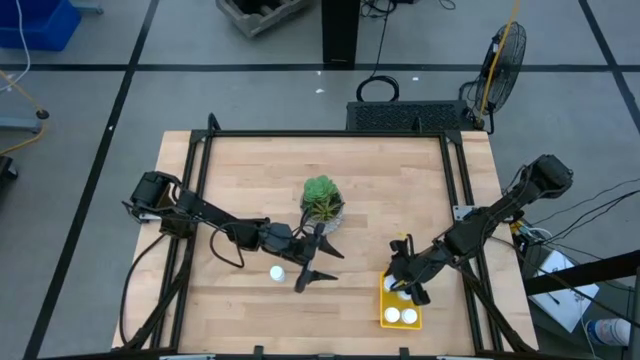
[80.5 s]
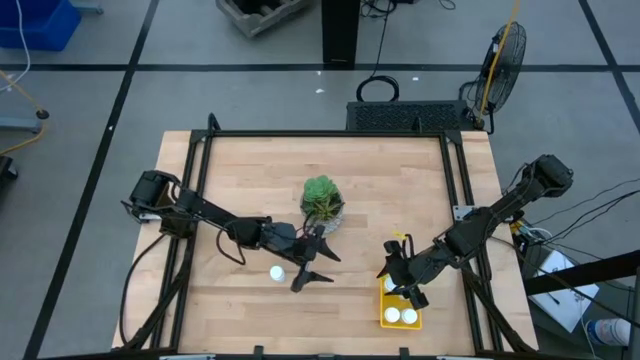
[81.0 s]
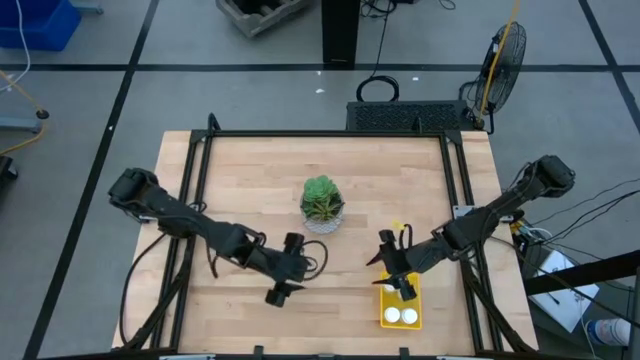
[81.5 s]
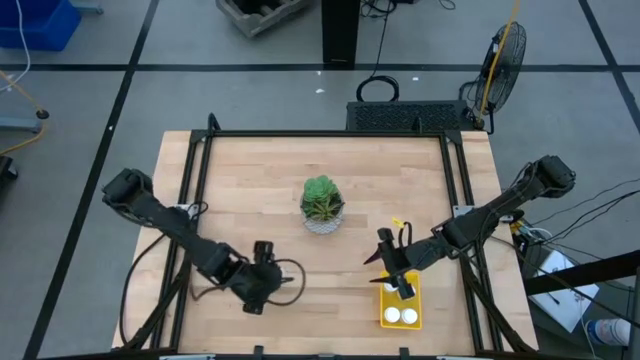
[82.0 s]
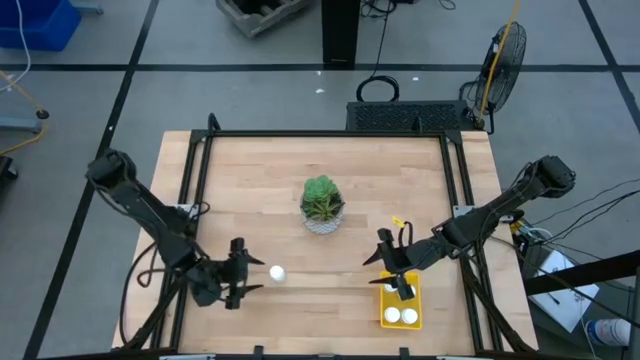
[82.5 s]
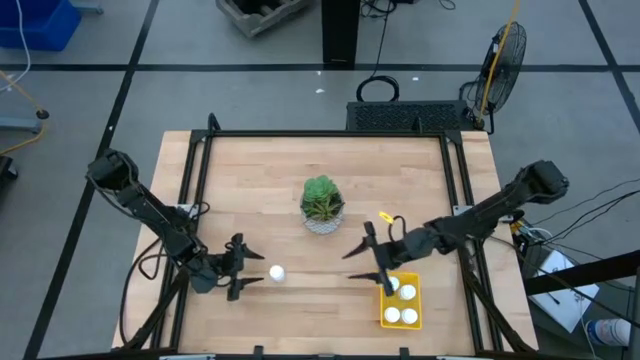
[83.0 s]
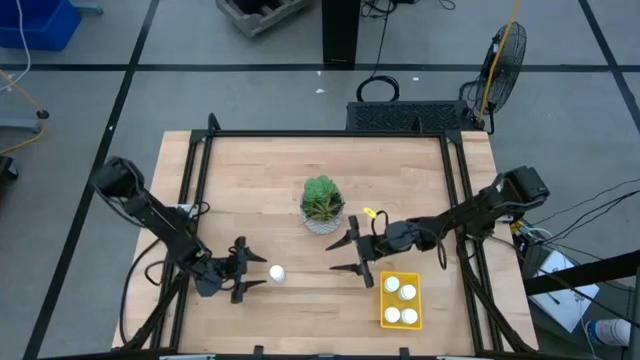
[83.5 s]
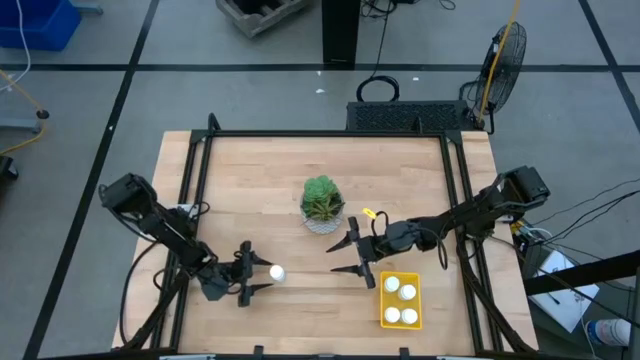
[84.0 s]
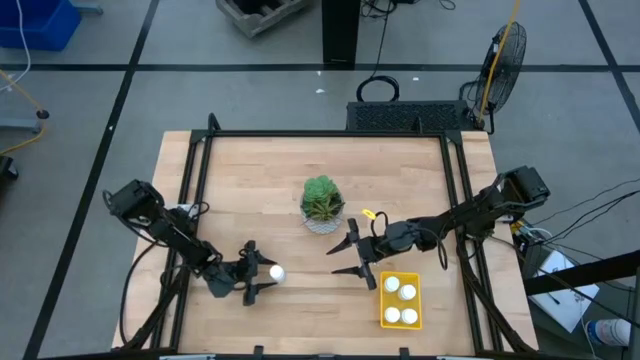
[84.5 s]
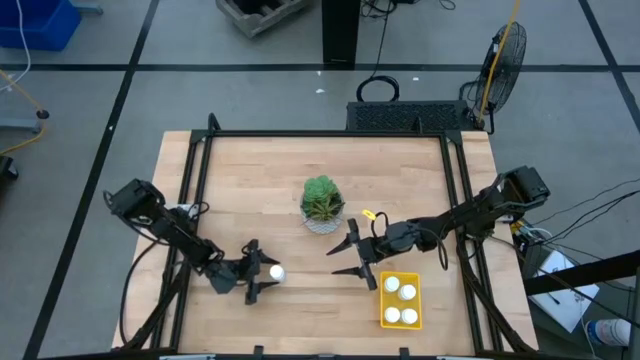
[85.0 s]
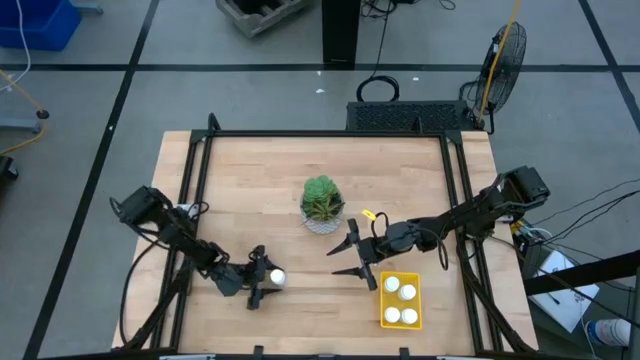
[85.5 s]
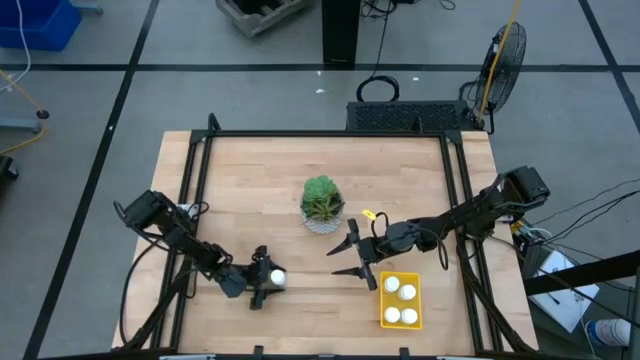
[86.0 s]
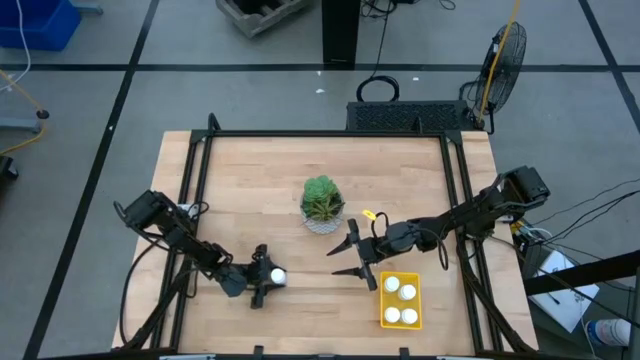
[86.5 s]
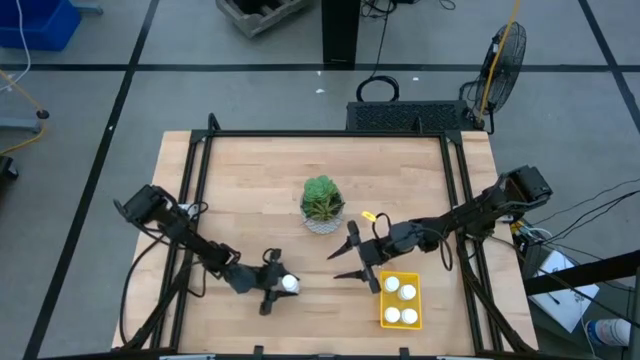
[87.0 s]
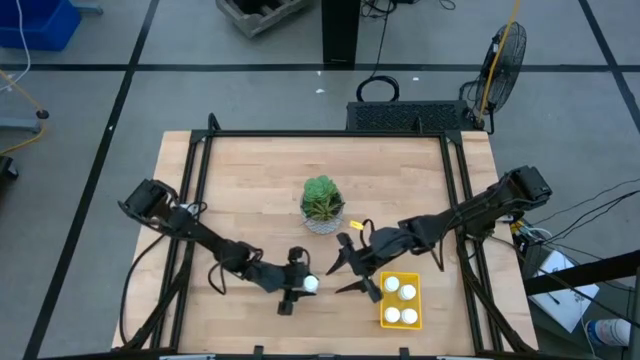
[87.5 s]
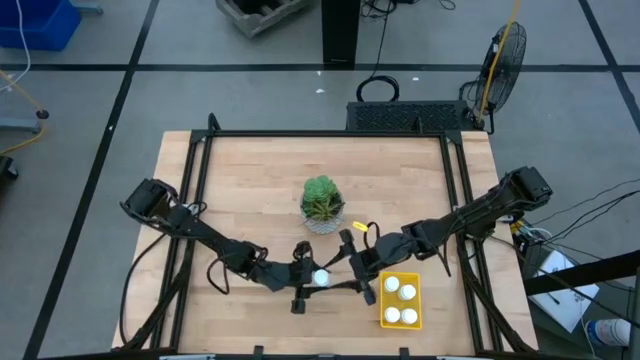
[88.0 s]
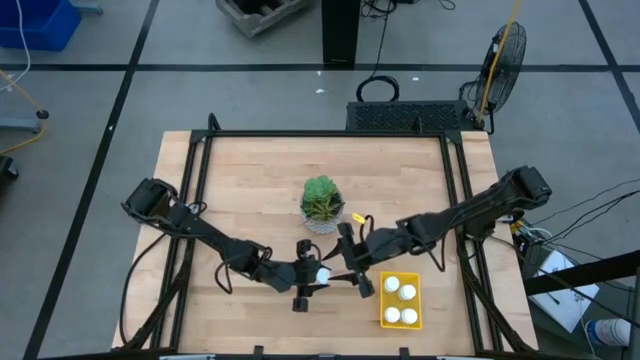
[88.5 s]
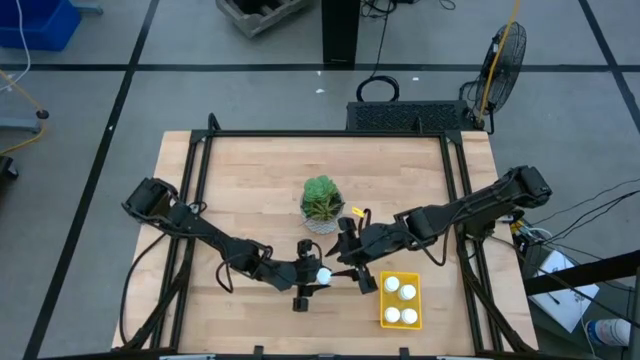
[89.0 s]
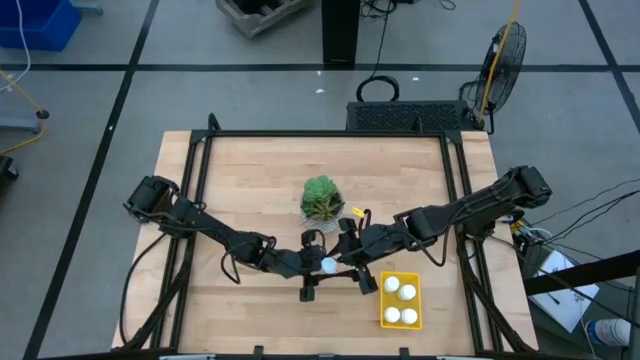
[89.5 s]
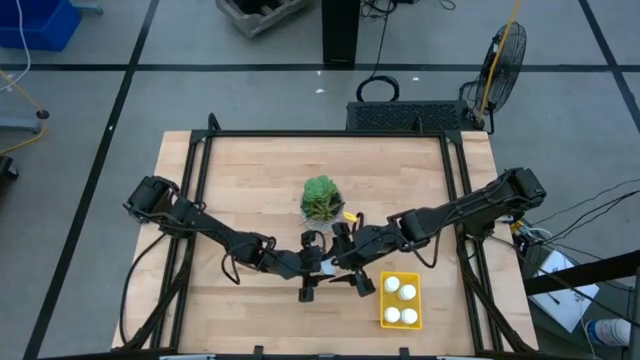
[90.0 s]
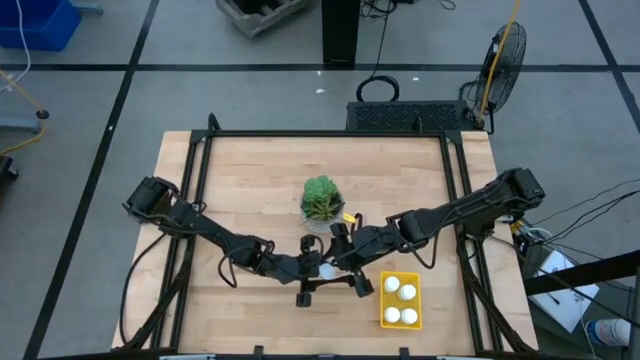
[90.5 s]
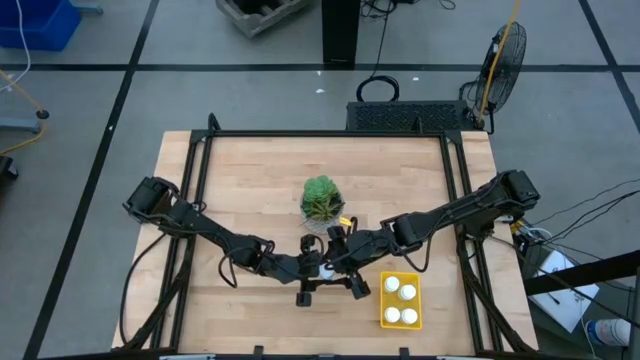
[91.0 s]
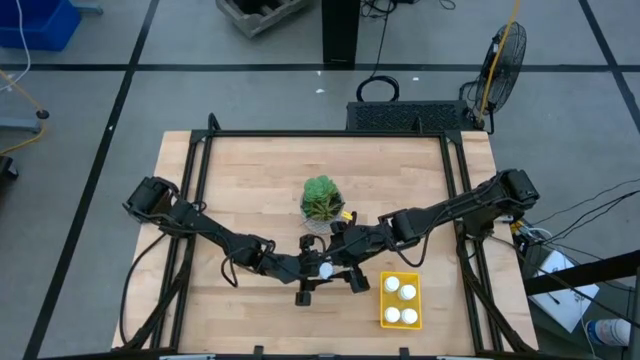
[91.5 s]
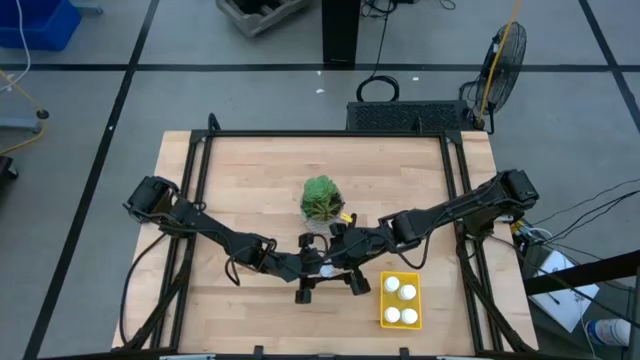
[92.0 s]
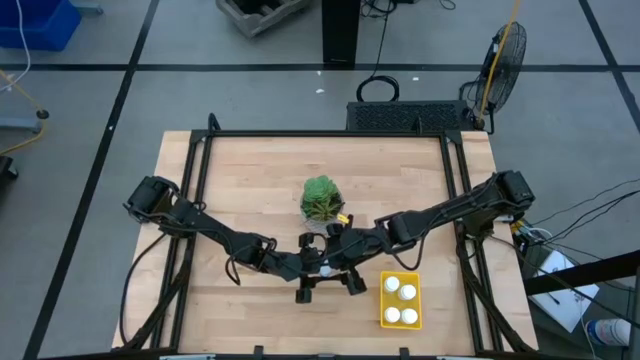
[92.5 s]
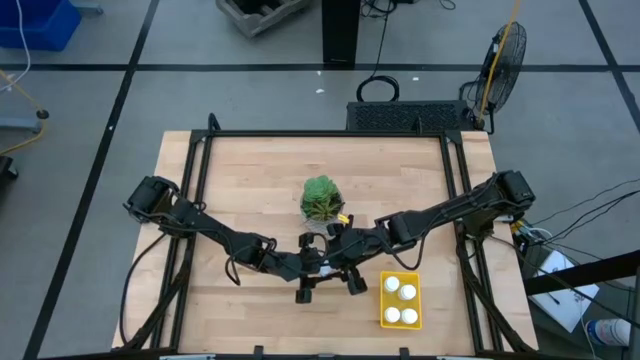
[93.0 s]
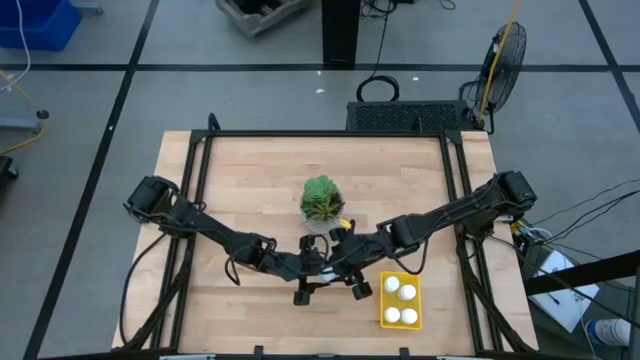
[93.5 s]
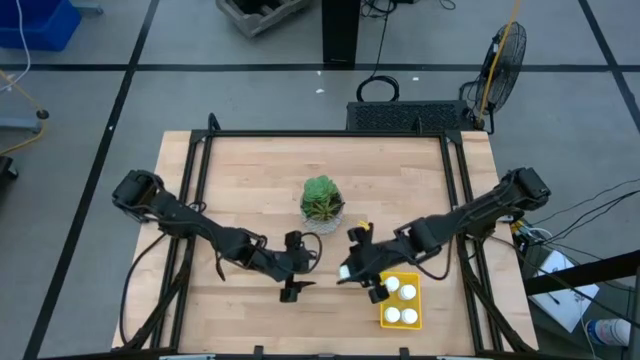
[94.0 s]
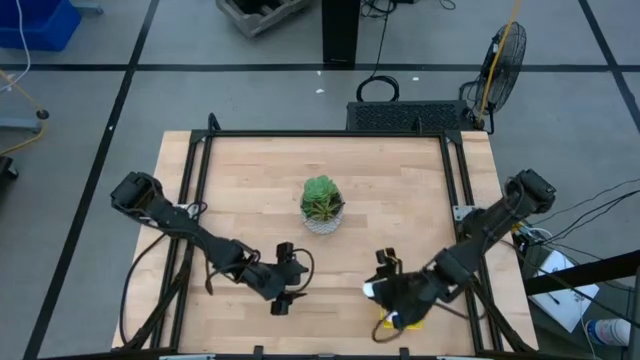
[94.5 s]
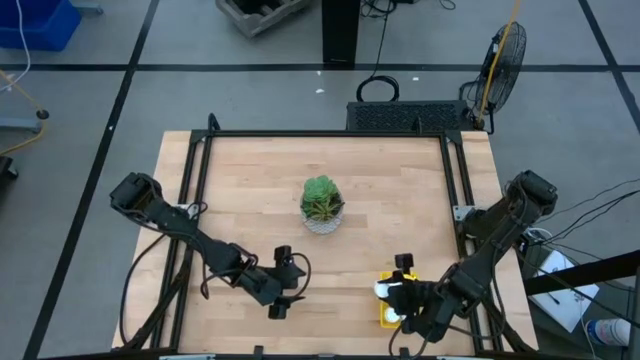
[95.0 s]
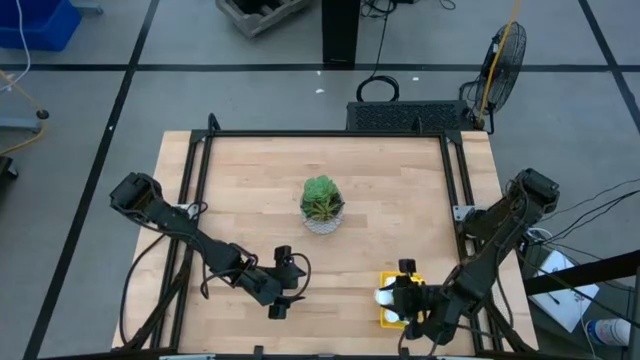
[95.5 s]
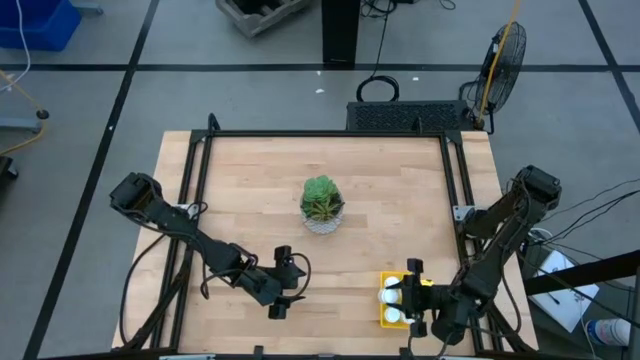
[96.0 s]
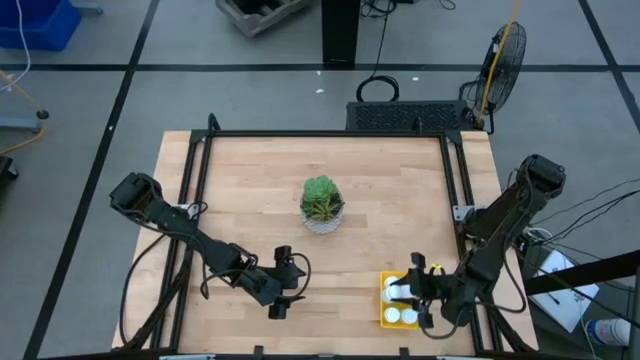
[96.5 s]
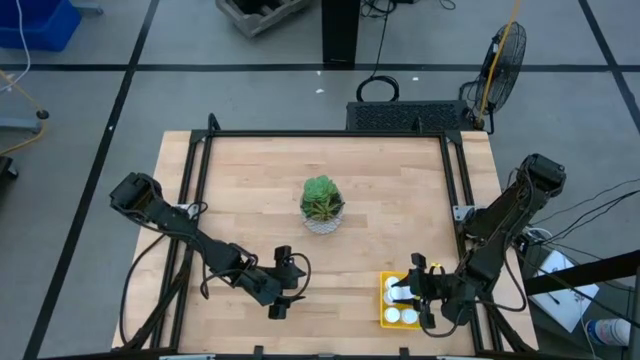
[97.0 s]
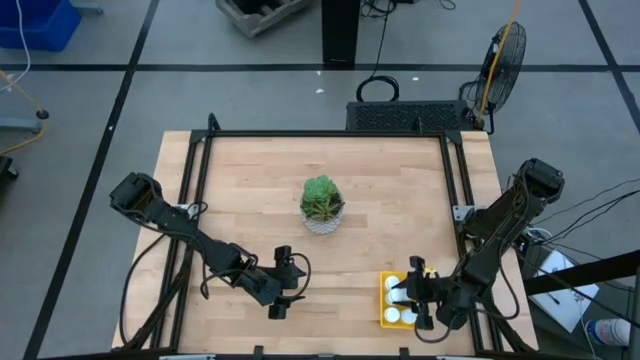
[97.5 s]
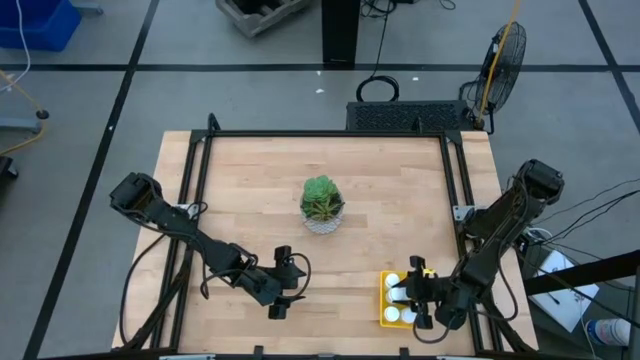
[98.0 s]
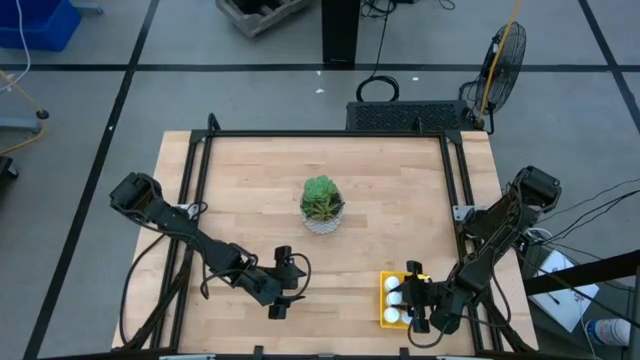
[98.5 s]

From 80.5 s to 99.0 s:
Task: Pick and place pill bottles into a basket
Put the white pill bottle into the bin
